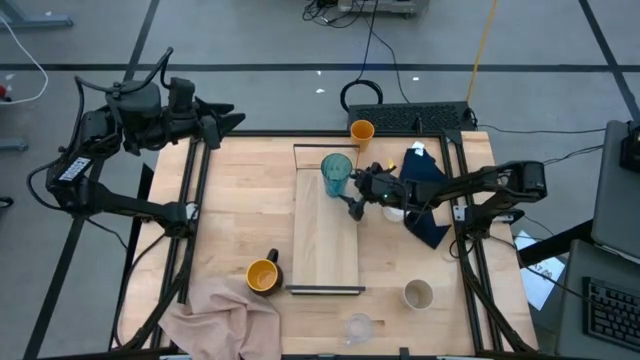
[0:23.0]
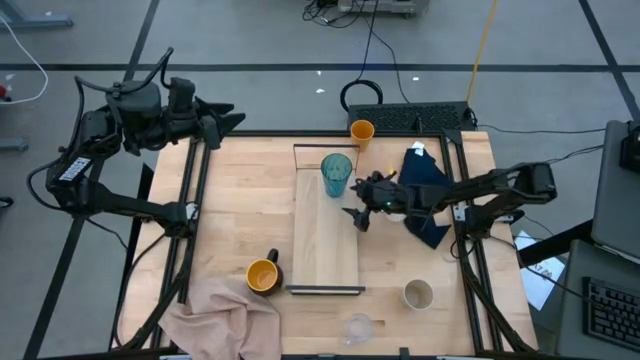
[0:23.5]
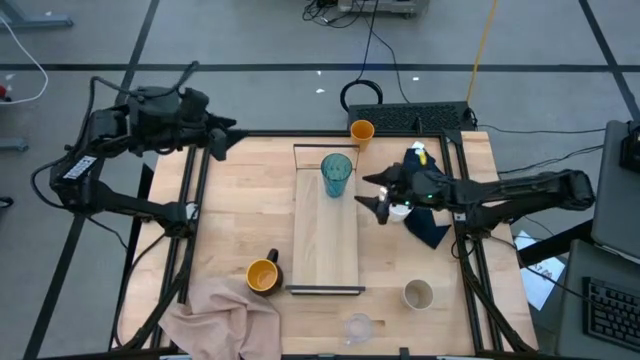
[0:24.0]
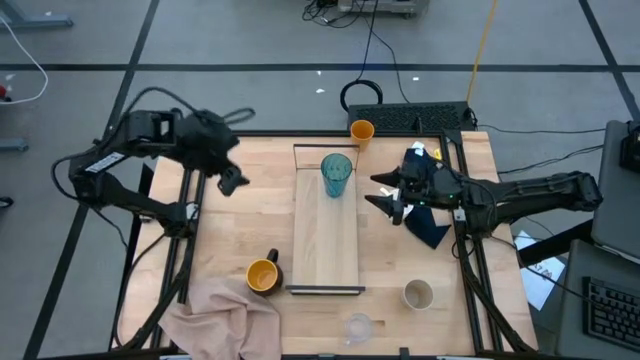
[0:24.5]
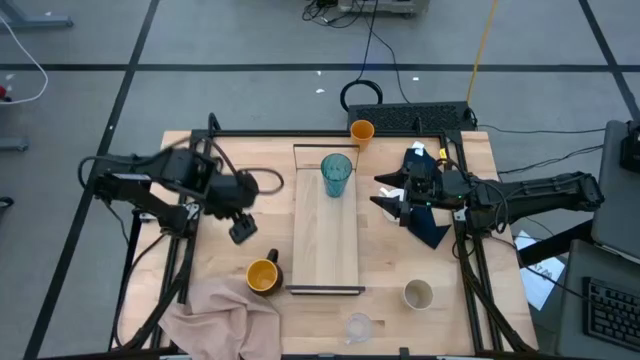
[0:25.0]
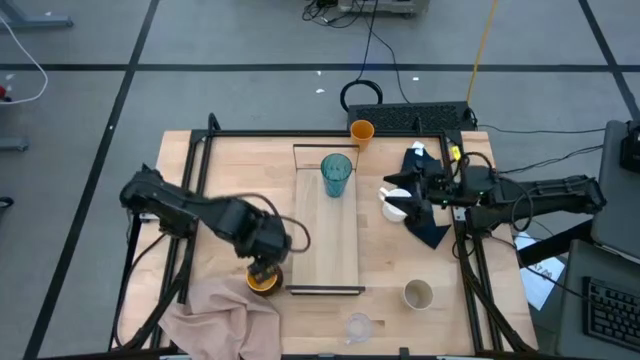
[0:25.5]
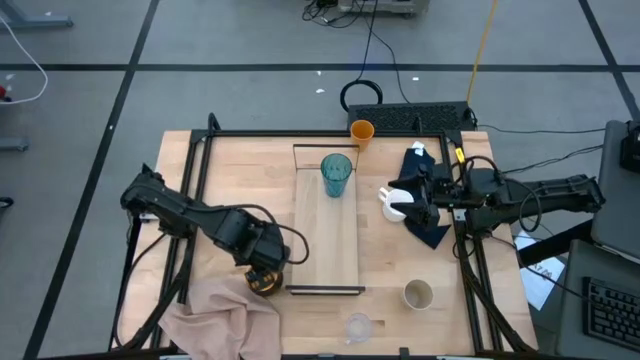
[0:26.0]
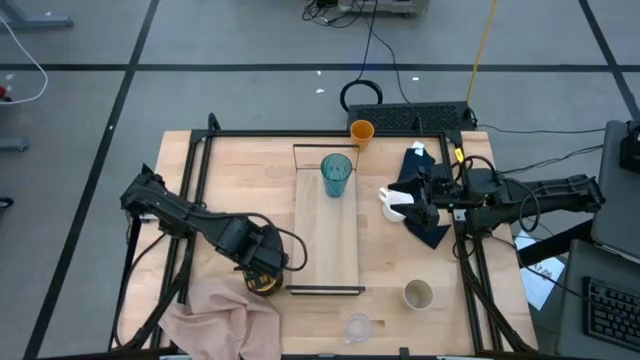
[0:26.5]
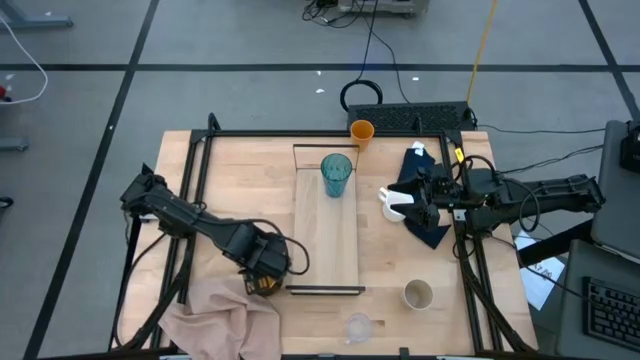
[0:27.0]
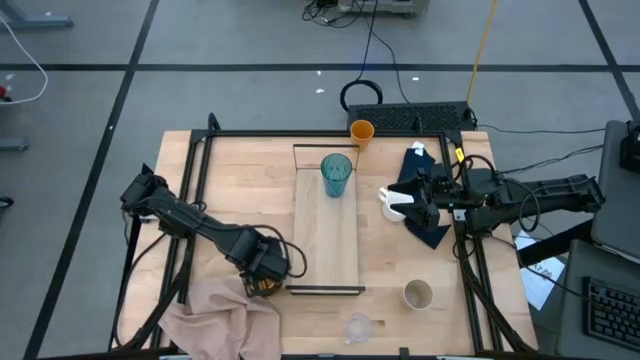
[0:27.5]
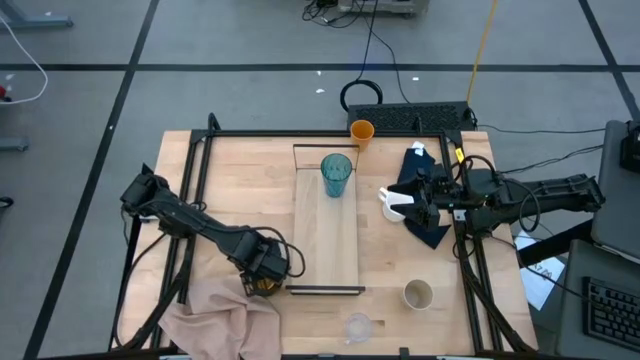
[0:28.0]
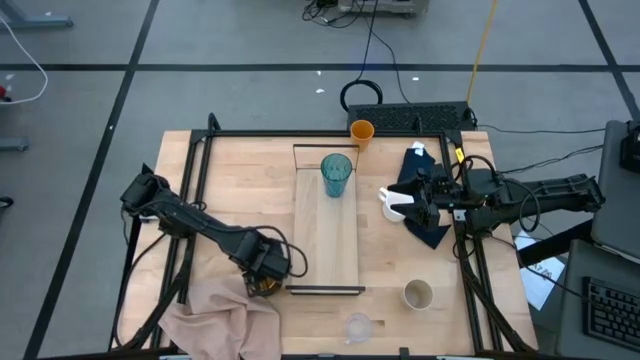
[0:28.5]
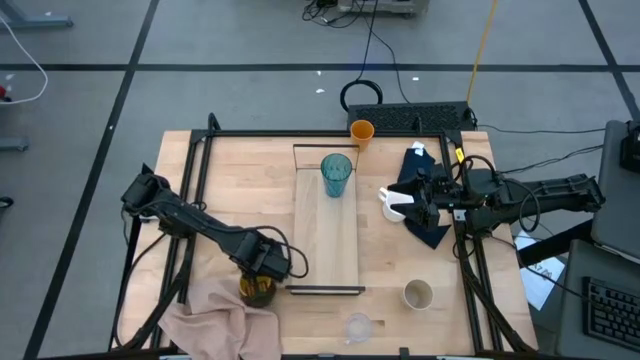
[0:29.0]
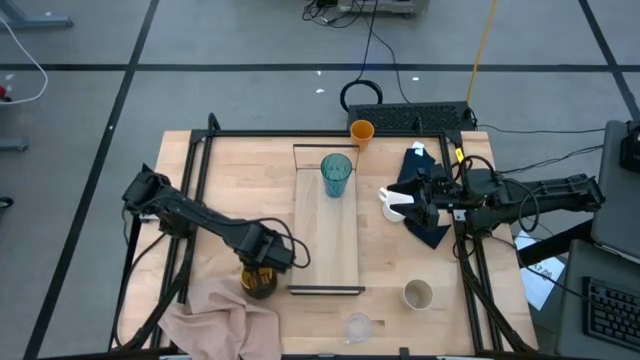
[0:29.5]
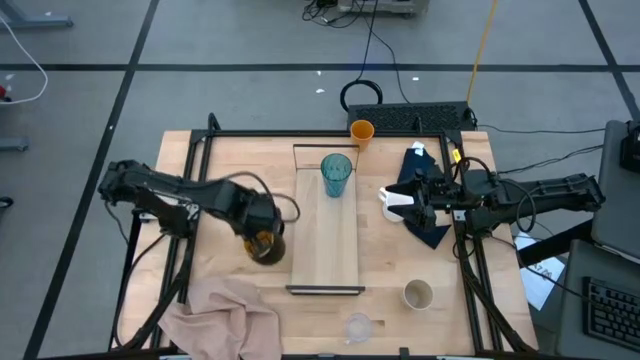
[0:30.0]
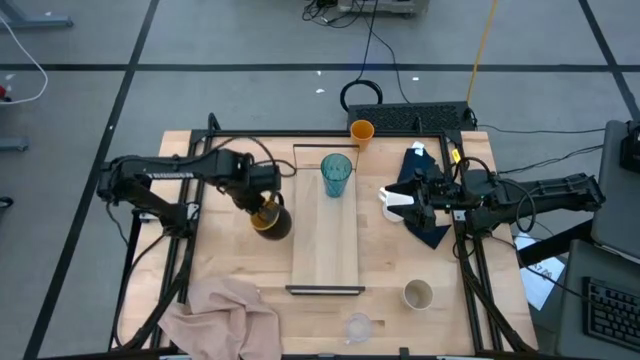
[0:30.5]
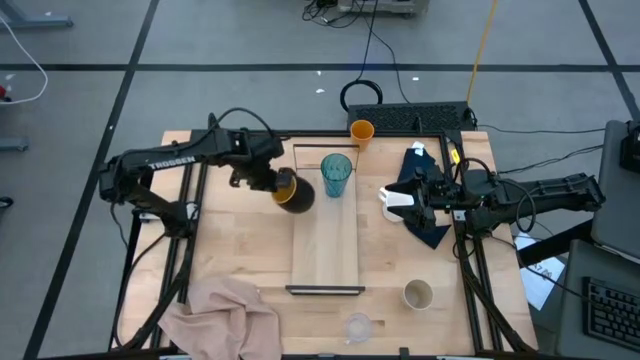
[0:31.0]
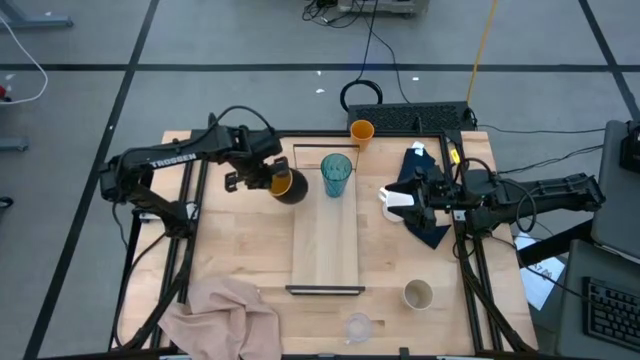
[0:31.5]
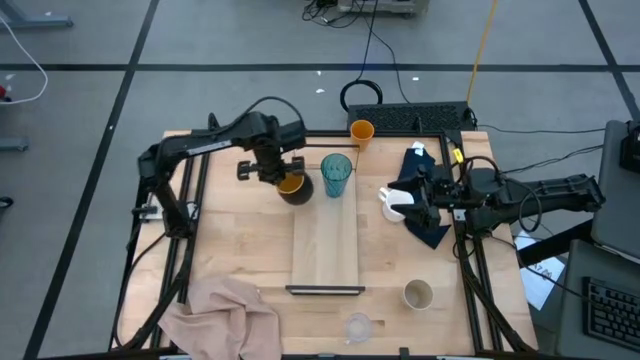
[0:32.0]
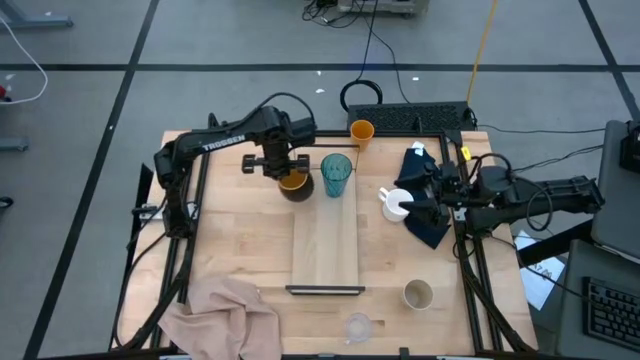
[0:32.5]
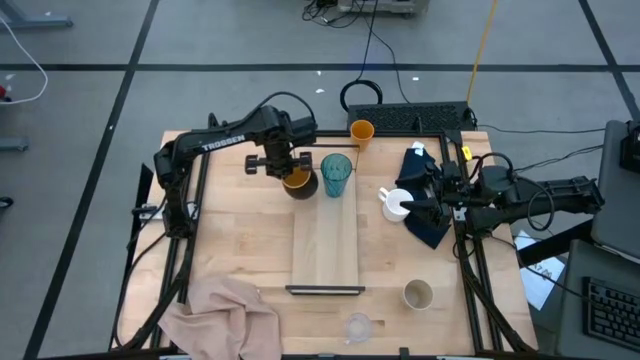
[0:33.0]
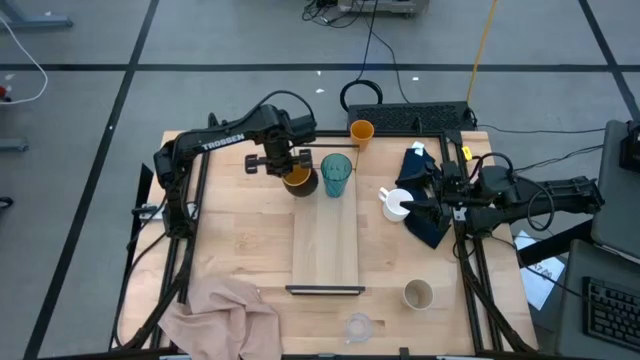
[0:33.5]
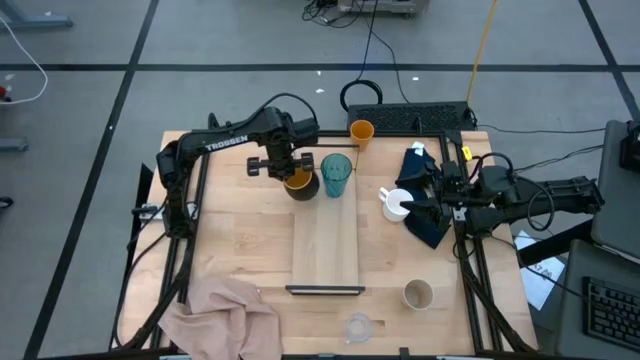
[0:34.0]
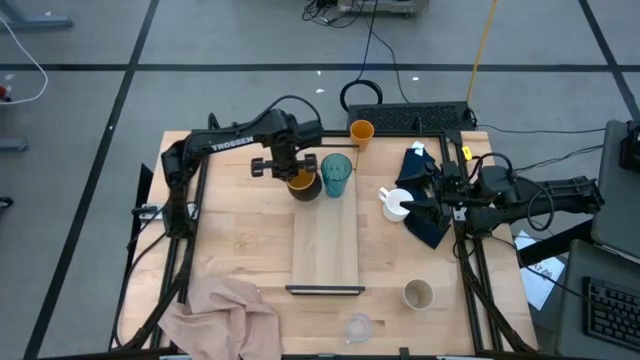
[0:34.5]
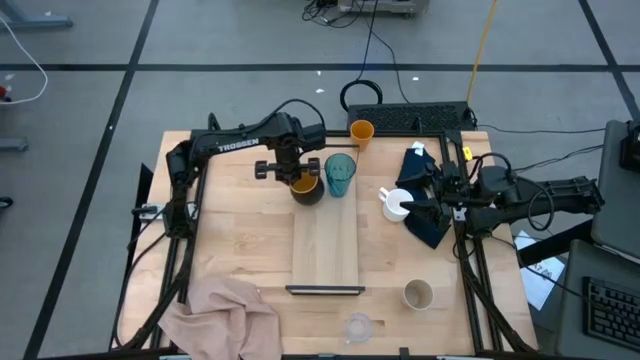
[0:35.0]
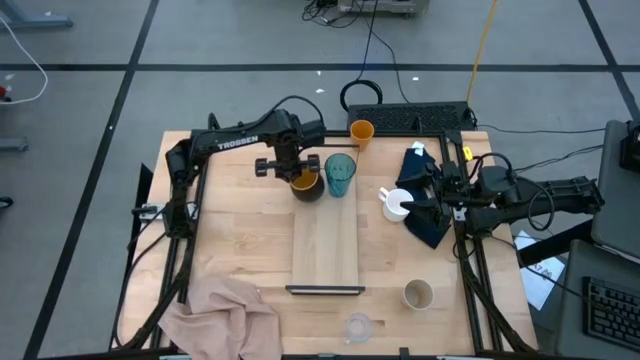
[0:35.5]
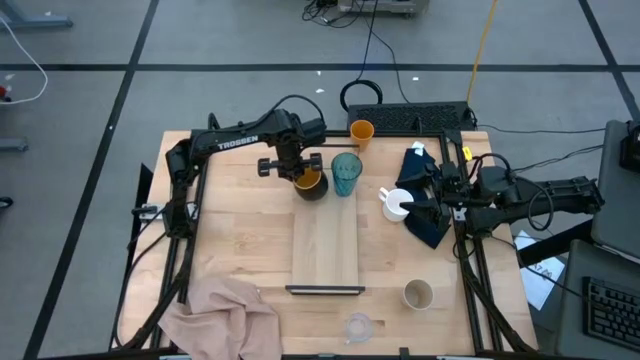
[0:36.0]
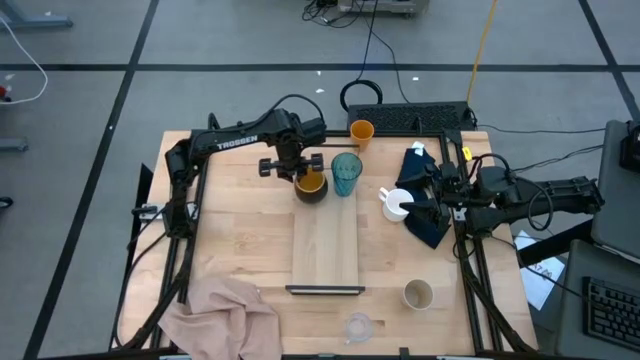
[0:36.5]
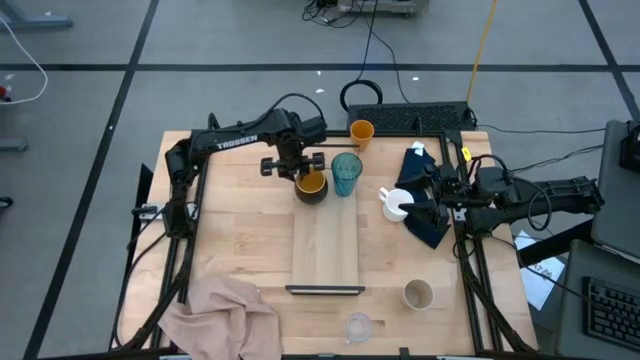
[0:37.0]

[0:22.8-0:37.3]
Task: Stack small to large cups/mugs on shelf
Put the yellow mug on the shelf

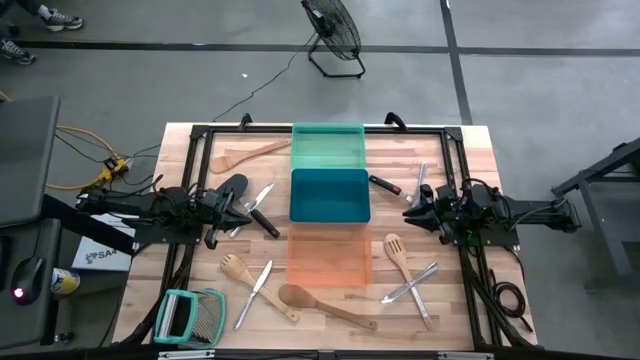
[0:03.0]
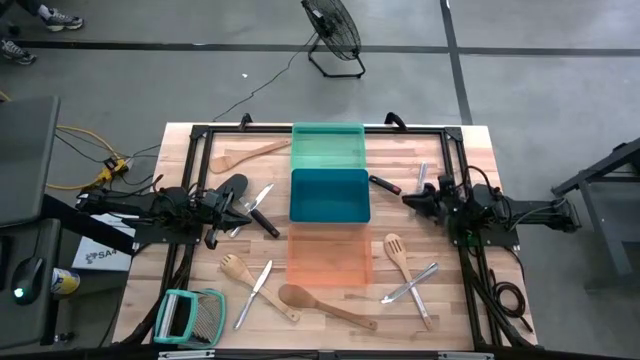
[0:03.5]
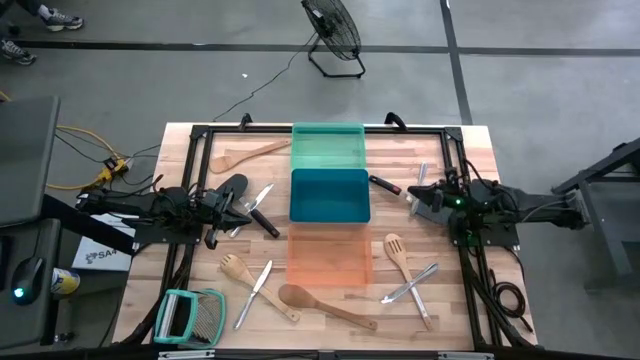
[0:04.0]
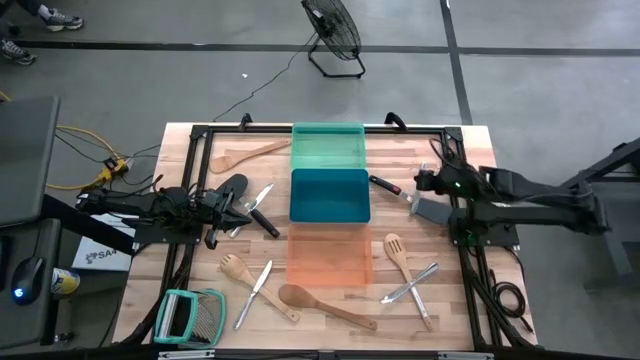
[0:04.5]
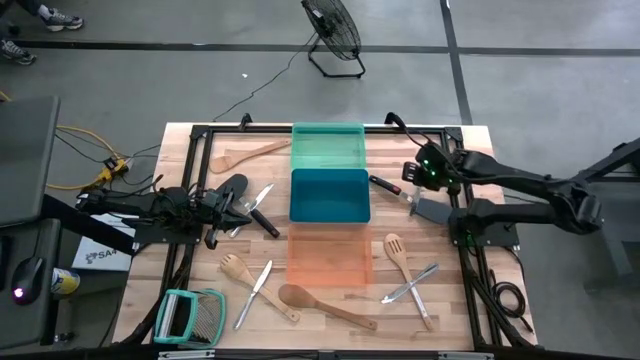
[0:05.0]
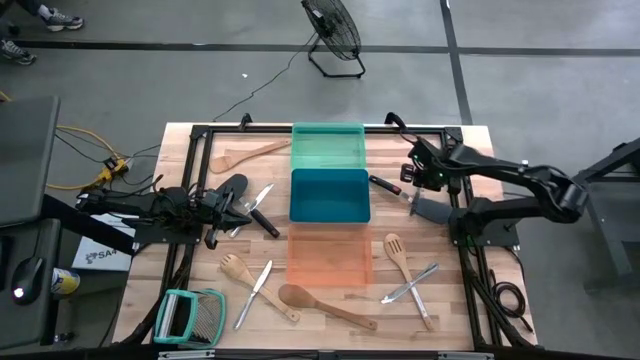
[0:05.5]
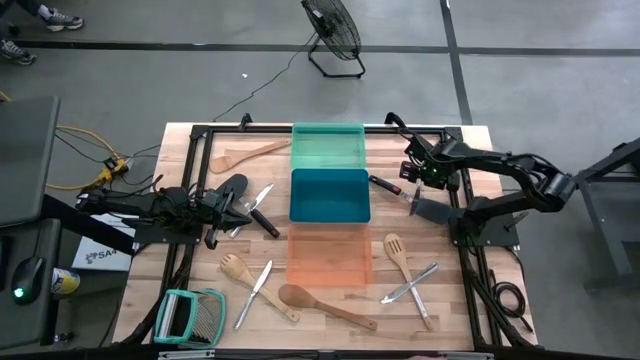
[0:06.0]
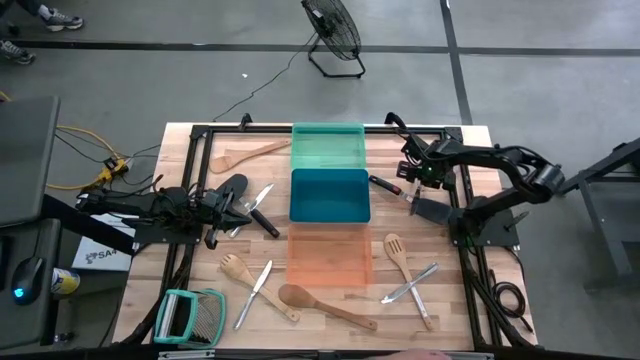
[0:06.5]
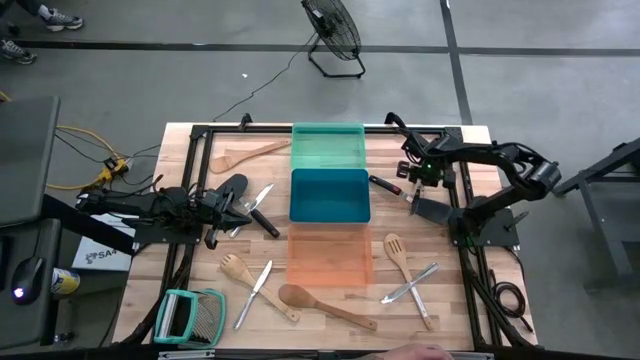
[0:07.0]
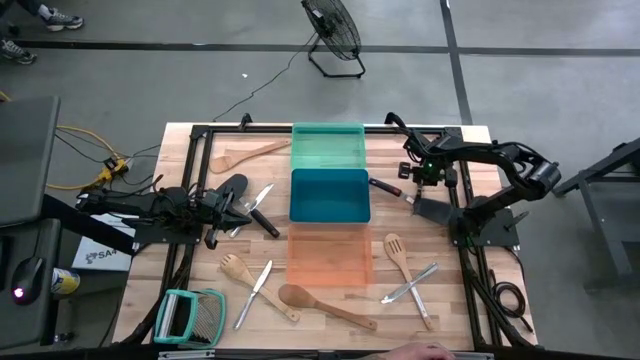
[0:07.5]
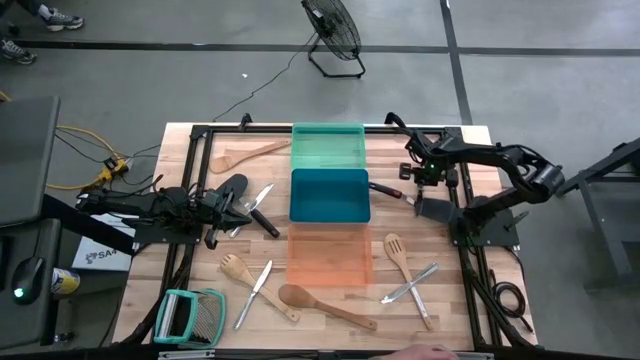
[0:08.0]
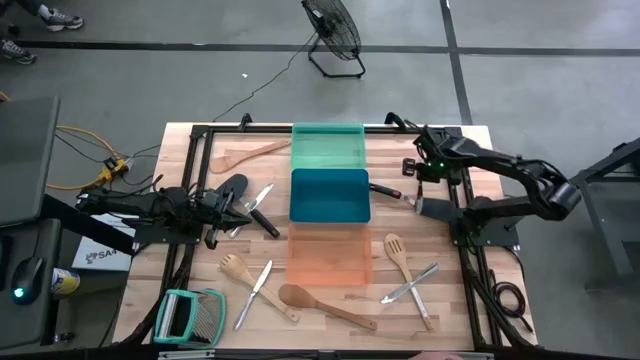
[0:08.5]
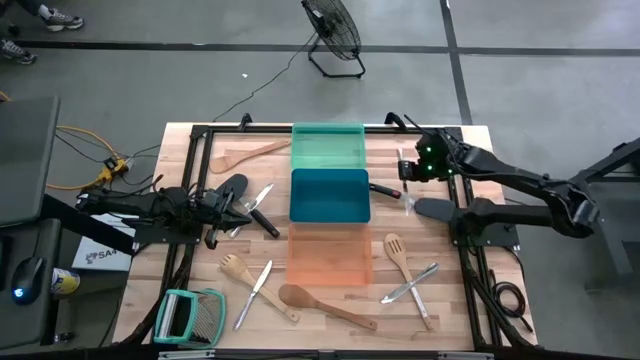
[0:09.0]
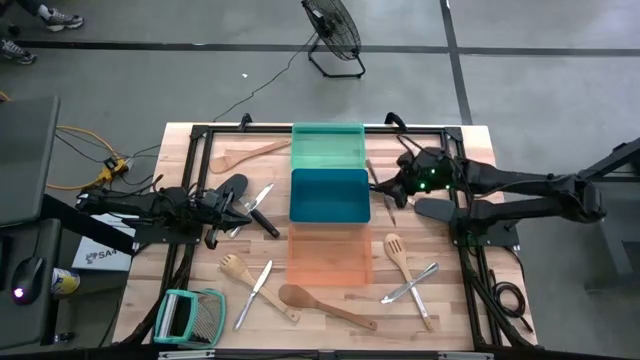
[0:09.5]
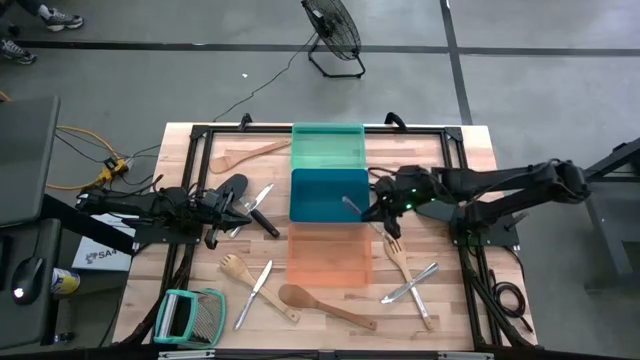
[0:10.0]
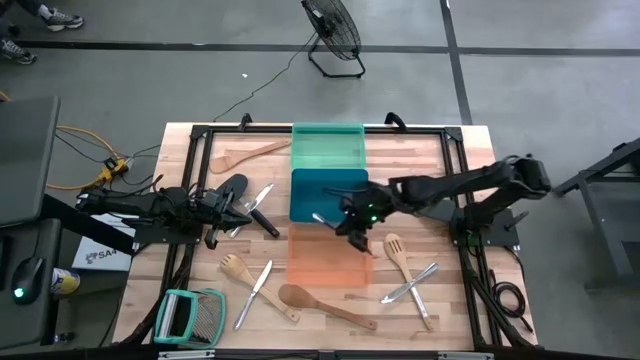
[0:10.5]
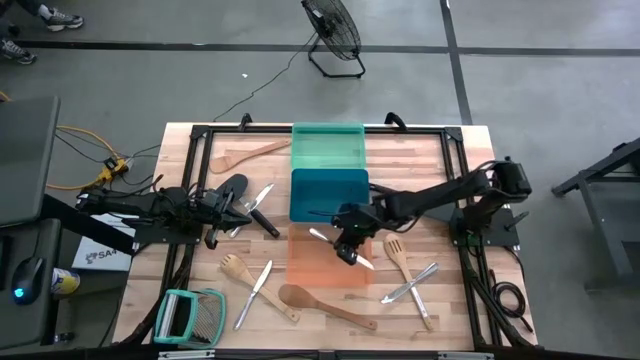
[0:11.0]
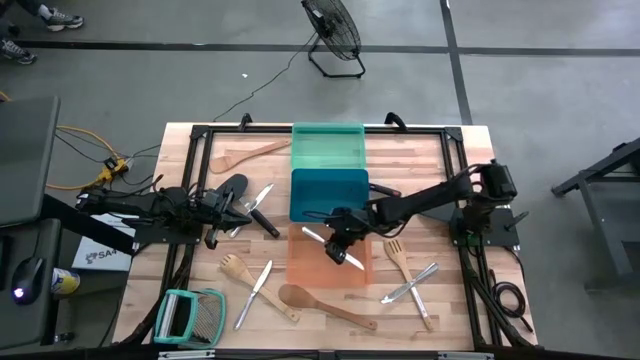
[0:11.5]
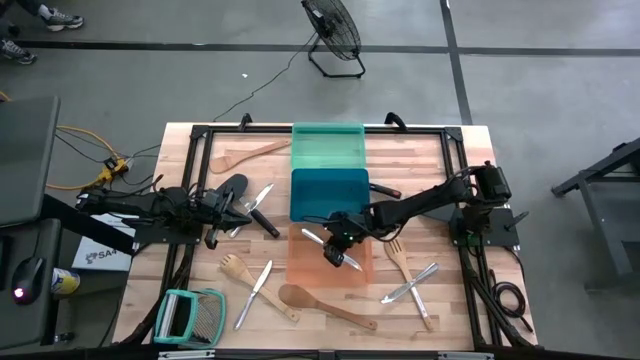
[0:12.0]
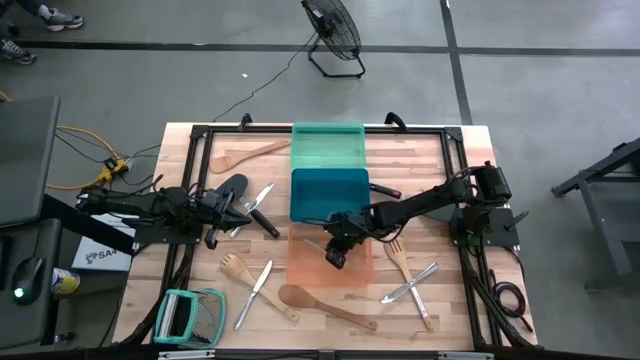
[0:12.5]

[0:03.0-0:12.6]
Task: Pick & Place Kitchen Items
Put the silver knife into the orange bin
